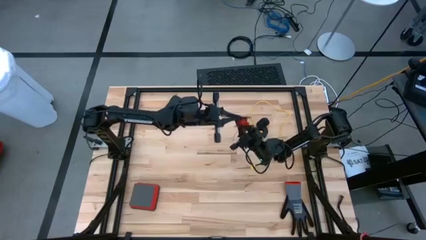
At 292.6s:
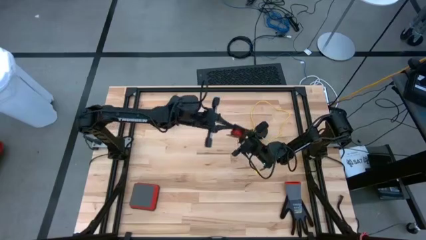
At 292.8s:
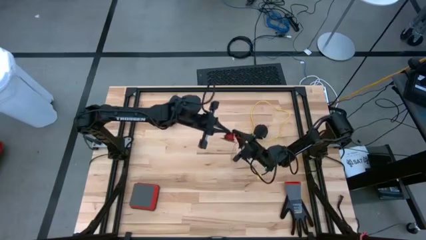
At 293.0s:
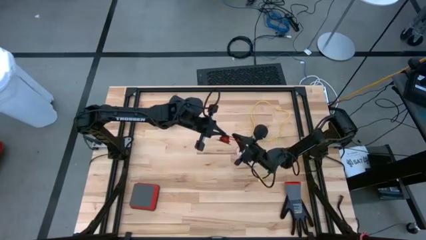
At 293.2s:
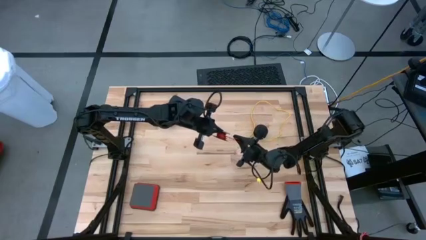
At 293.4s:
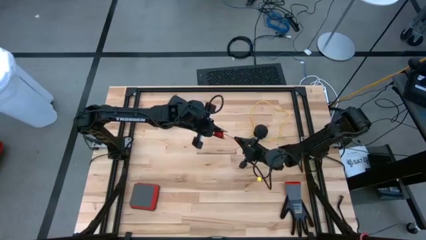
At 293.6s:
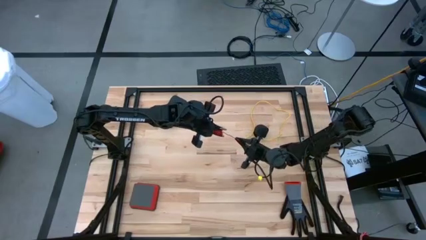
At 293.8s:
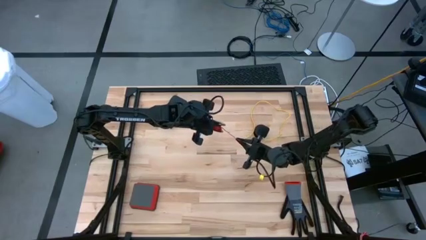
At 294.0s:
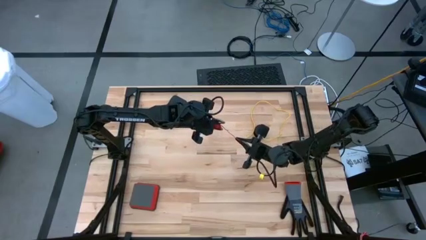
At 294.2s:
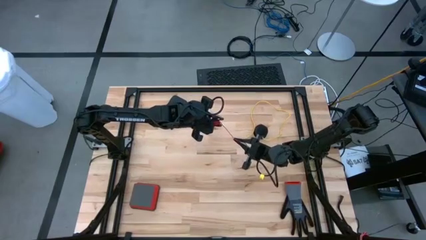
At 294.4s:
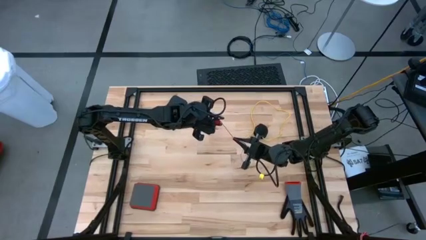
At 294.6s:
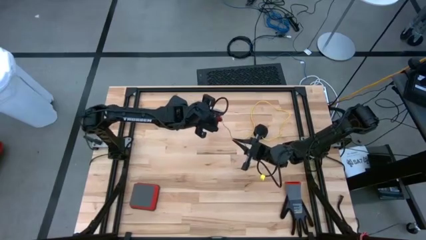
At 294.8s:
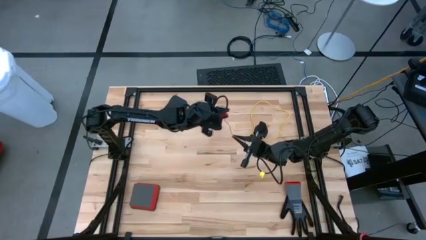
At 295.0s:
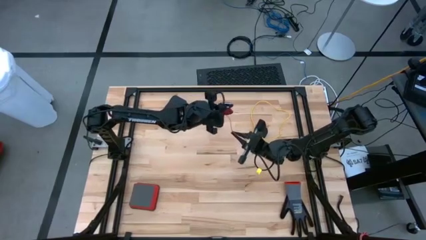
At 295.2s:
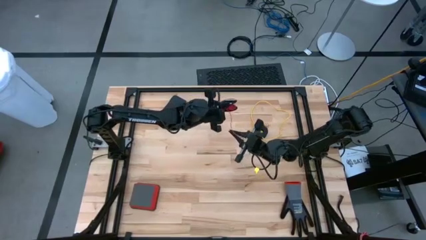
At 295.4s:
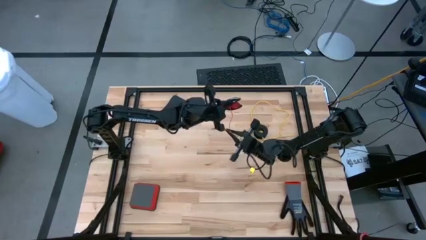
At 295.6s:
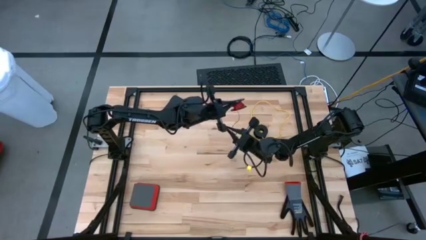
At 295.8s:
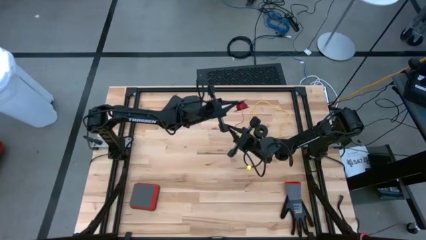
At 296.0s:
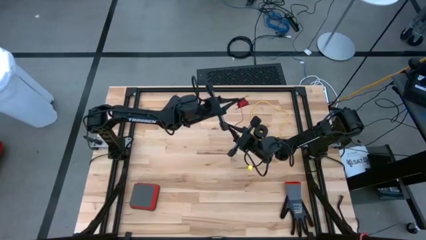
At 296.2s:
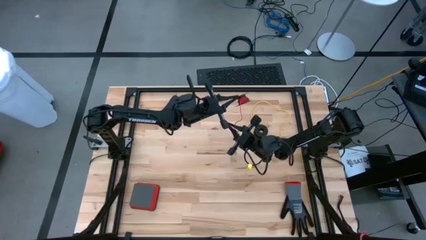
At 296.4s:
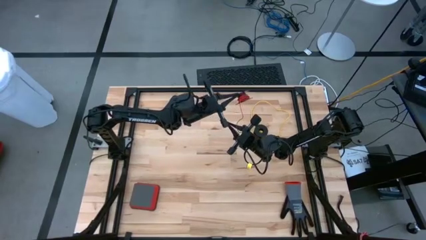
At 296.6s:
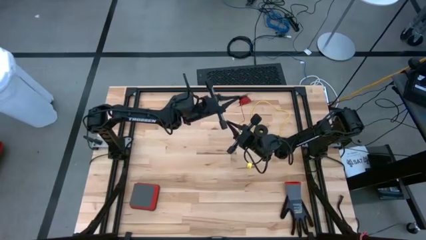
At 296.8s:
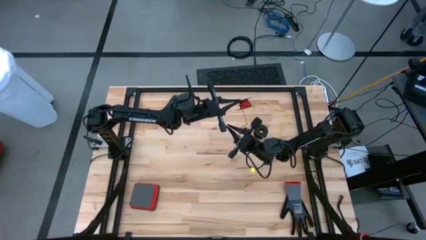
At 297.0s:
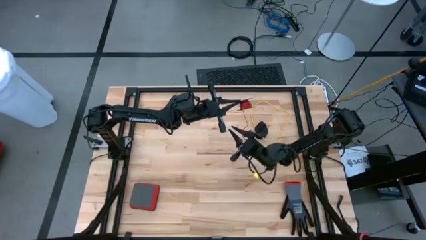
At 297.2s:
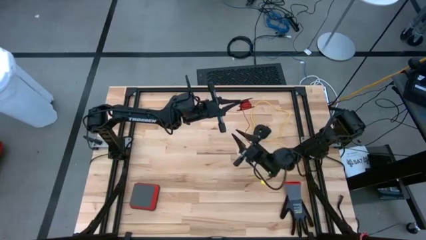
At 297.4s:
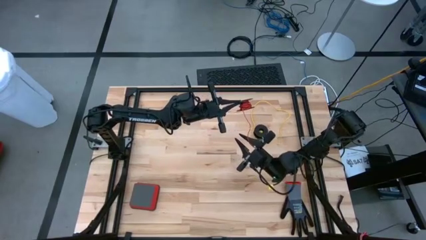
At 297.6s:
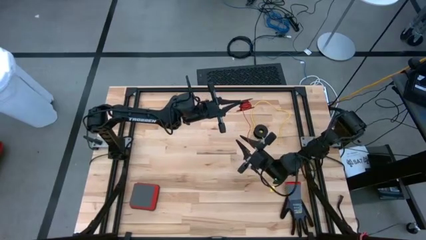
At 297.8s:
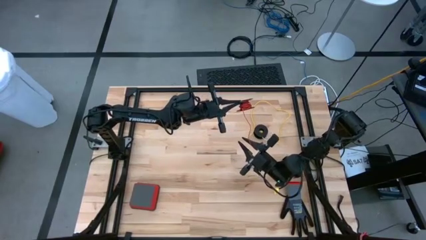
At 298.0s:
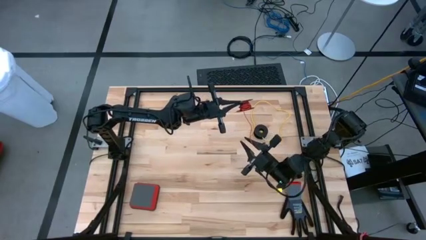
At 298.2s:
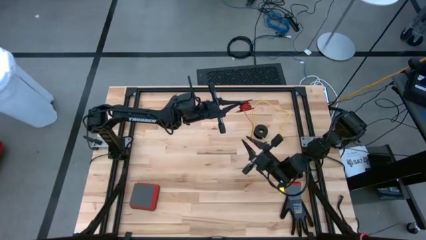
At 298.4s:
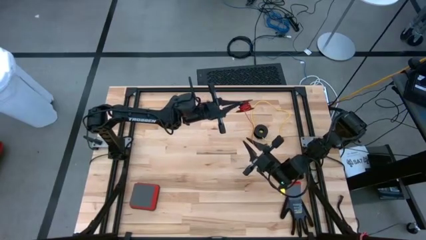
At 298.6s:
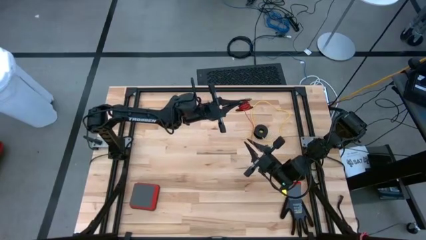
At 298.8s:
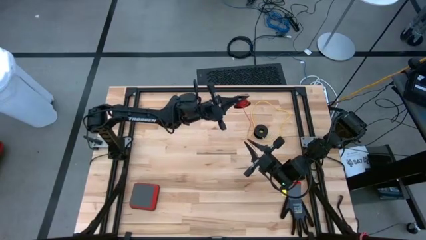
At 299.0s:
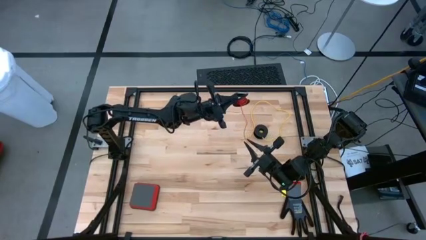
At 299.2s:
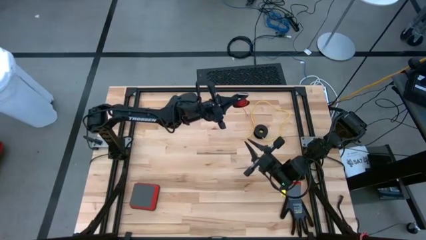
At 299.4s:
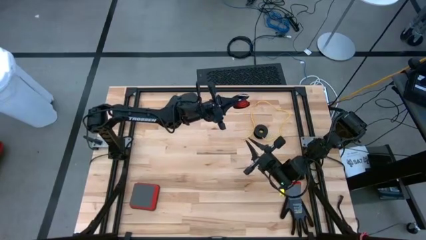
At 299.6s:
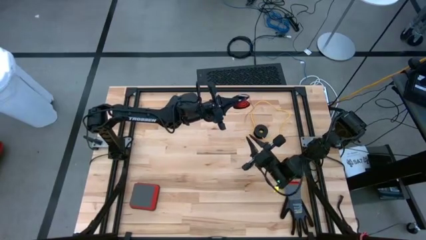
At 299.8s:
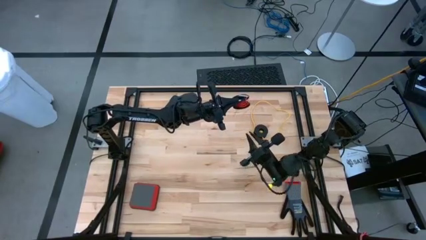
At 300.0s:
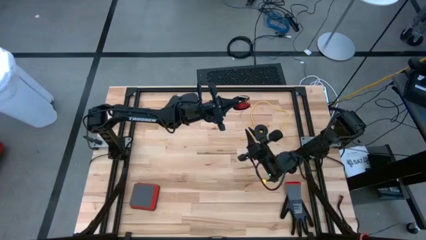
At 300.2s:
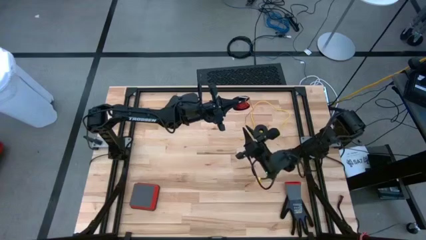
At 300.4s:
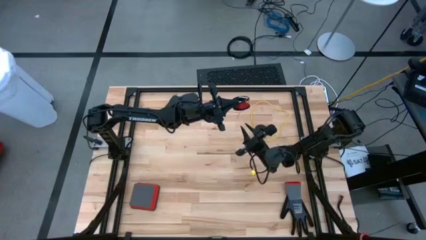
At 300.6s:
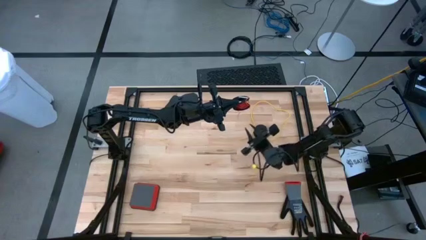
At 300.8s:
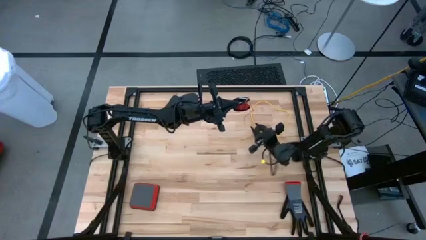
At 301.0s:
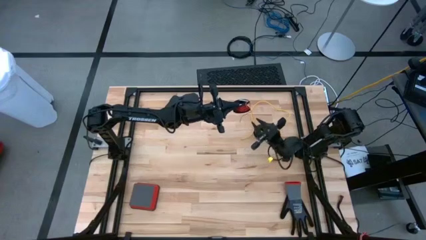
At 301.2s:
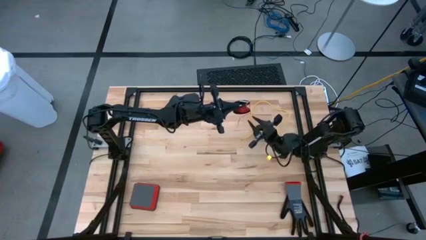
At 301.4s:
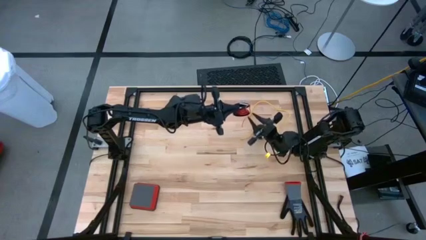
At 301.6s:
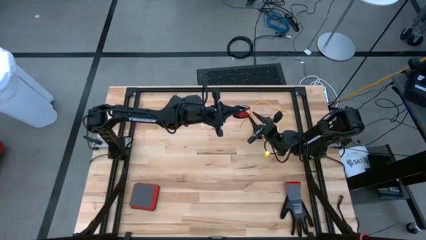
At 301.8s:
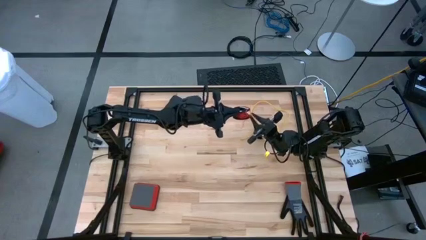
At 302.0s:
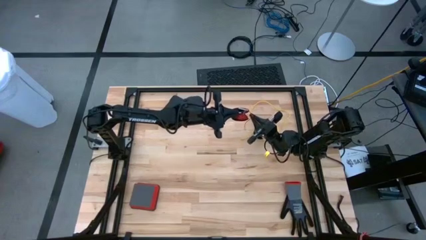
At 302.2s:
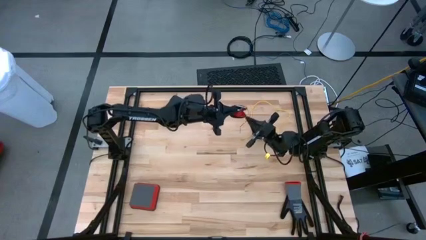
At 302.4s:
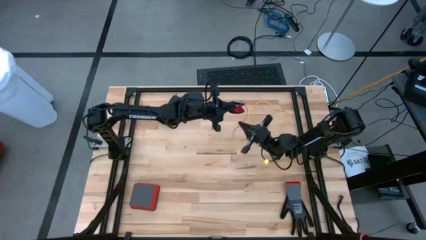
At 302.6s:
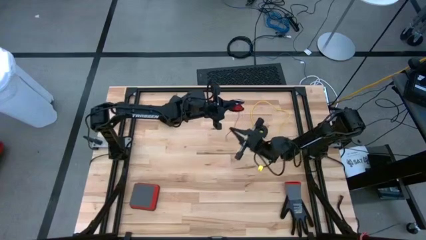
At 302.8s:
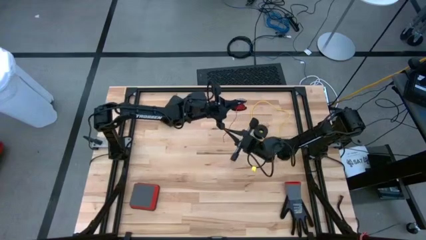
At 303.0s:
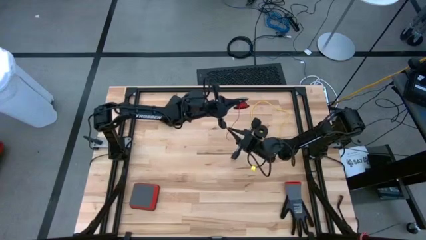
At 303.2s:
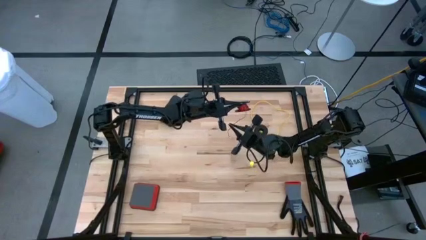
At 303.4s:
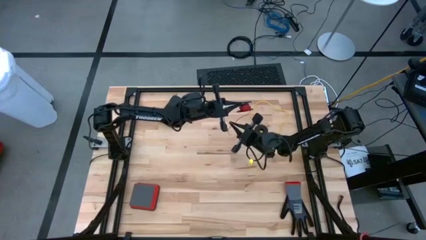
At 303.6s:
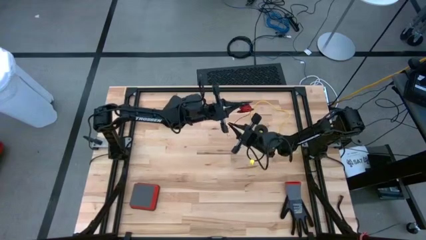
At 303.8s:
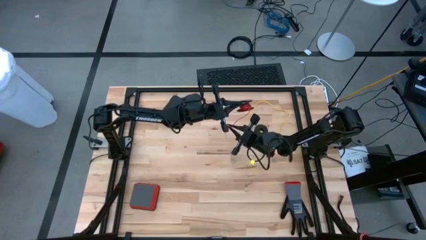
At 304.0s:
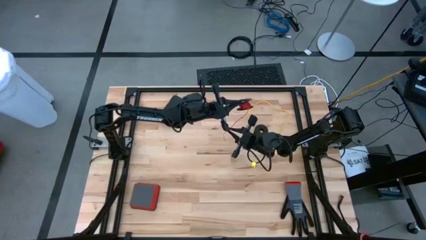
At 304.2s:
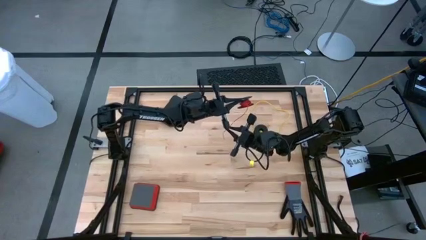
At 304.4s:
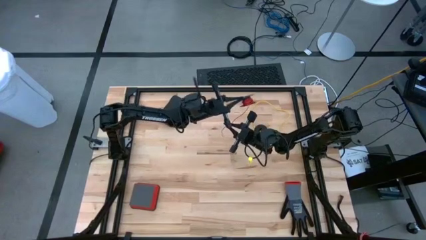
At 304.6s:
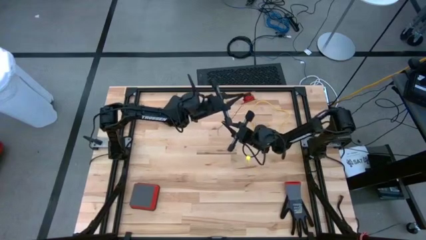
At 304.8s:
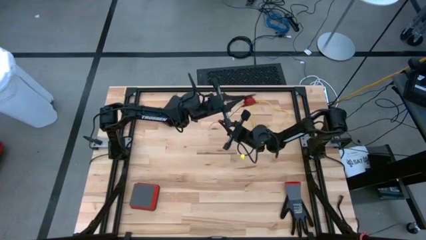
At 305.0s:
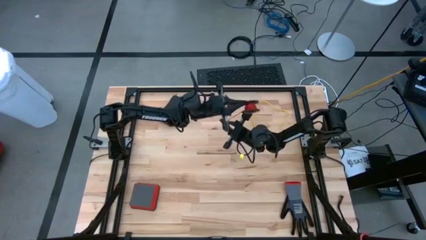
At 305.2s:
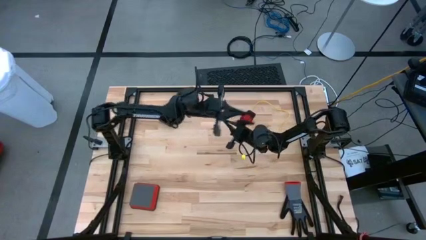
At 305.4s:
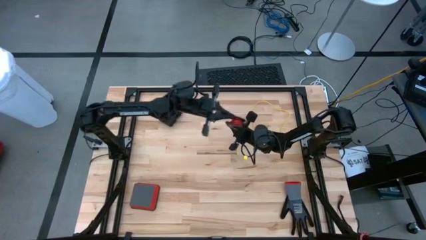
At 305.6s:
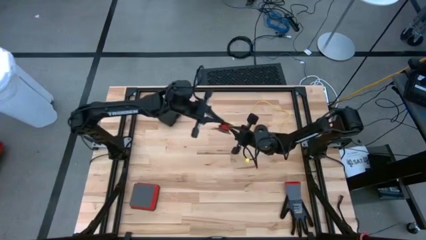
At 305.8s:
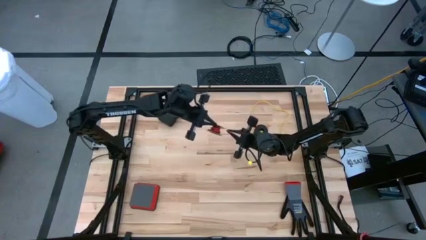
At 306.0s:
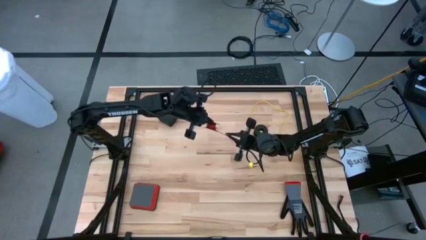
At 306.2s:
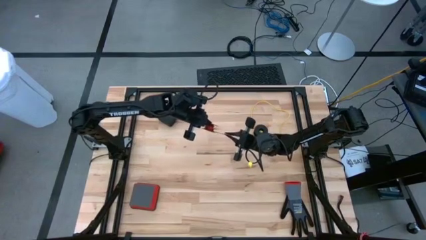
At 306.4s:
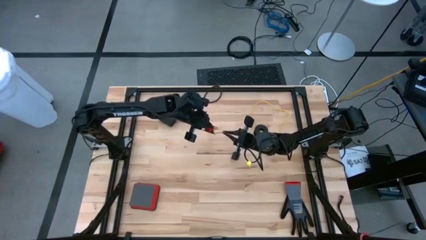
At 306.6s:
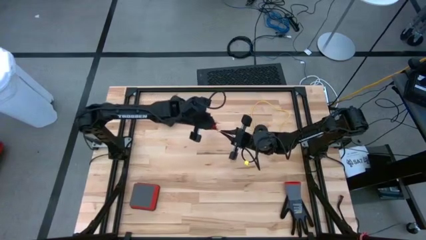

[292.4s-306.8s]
Task: Coil cords
Coil the red wire onto the black spool
